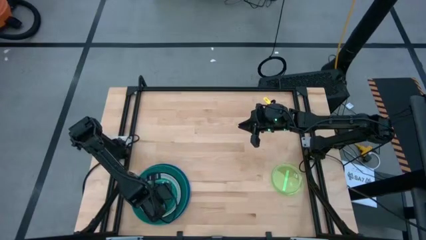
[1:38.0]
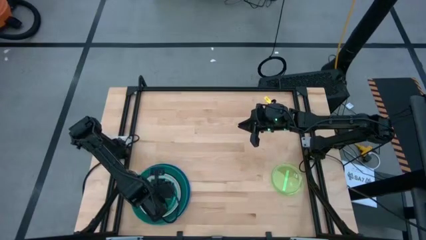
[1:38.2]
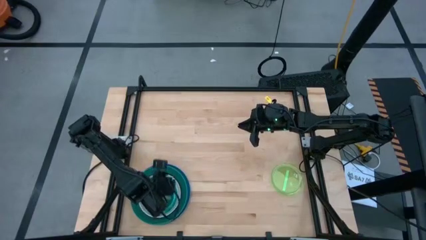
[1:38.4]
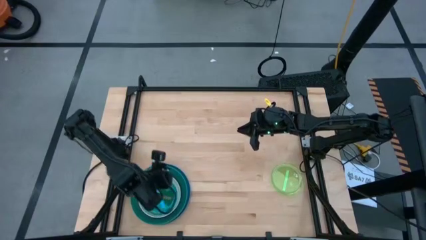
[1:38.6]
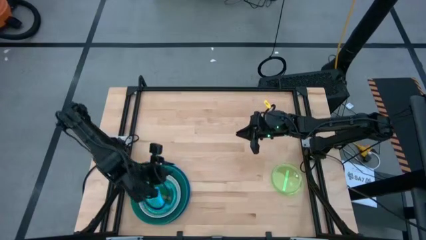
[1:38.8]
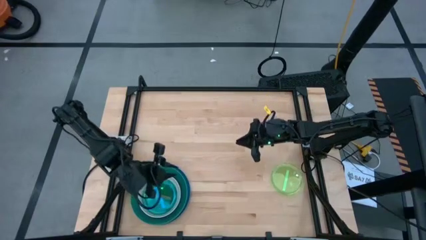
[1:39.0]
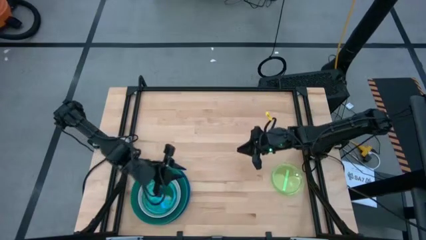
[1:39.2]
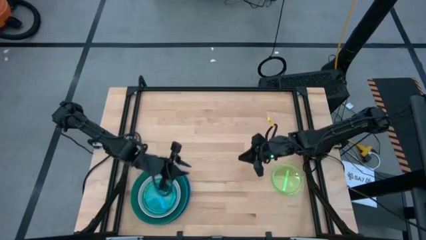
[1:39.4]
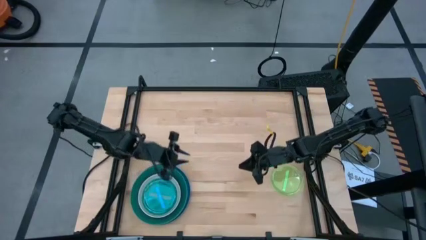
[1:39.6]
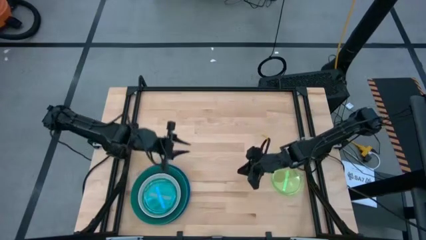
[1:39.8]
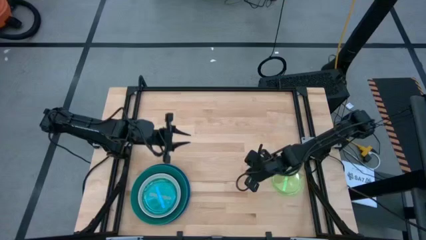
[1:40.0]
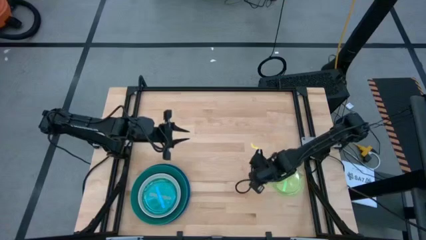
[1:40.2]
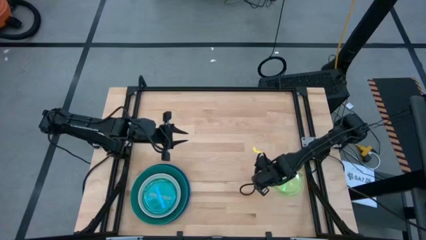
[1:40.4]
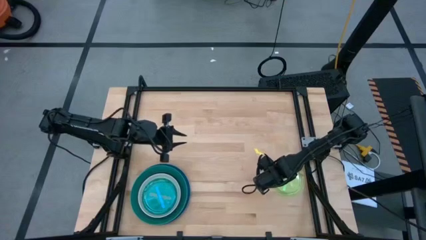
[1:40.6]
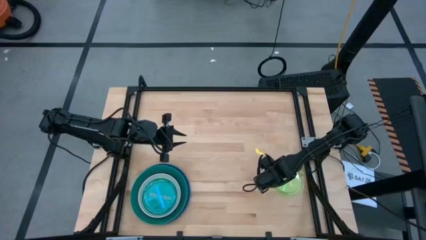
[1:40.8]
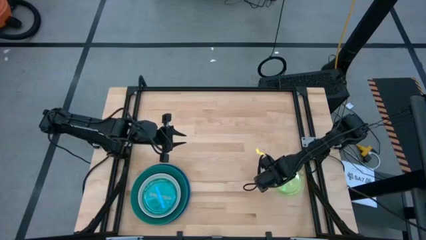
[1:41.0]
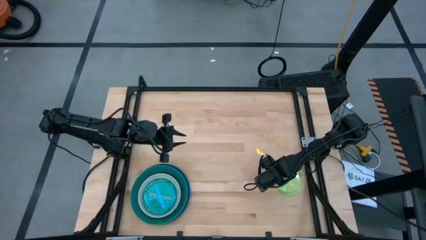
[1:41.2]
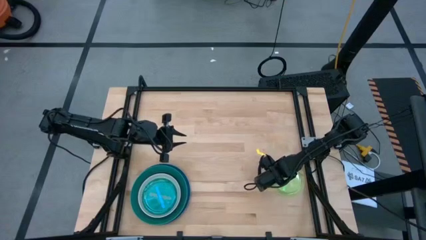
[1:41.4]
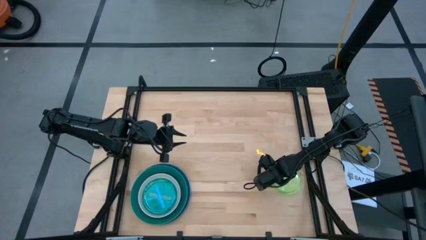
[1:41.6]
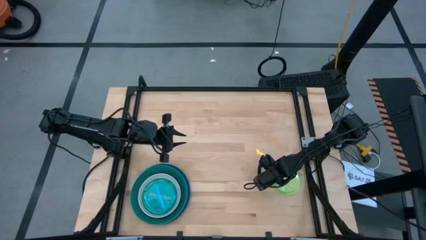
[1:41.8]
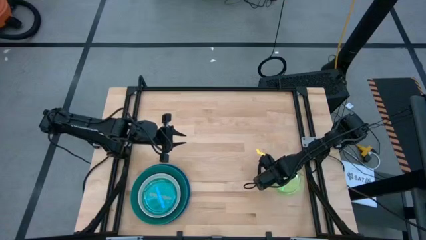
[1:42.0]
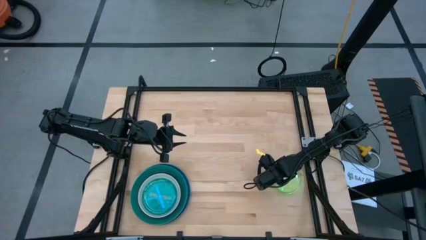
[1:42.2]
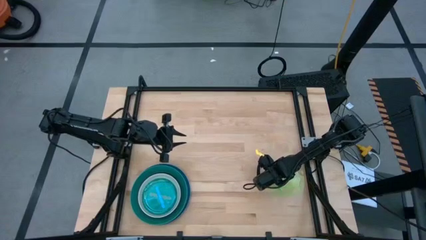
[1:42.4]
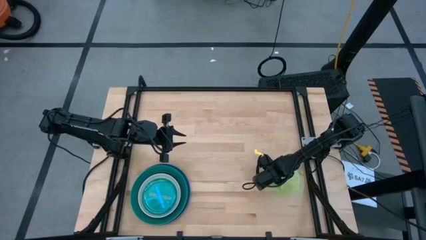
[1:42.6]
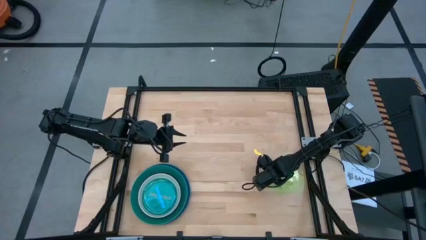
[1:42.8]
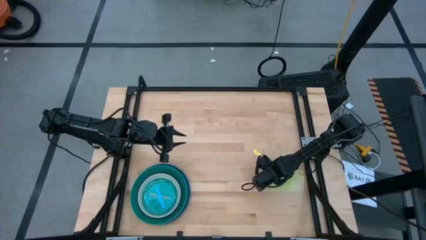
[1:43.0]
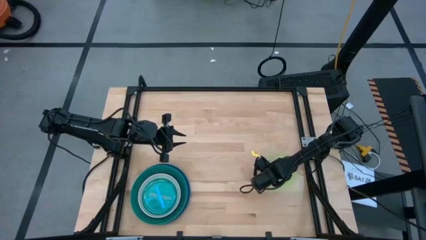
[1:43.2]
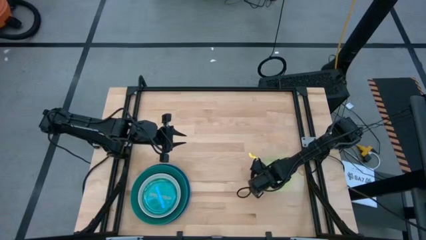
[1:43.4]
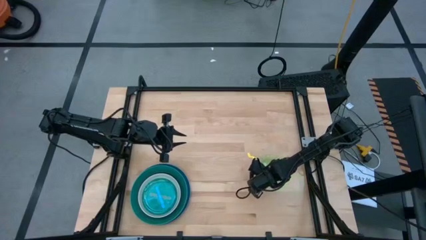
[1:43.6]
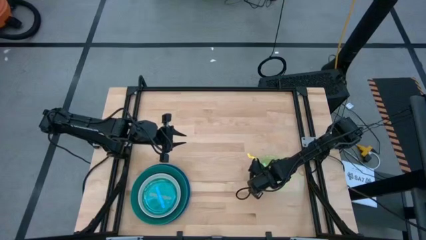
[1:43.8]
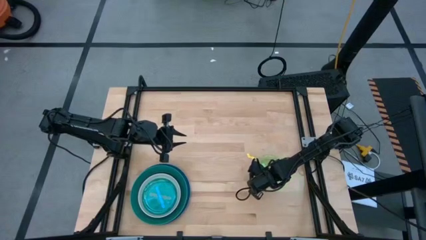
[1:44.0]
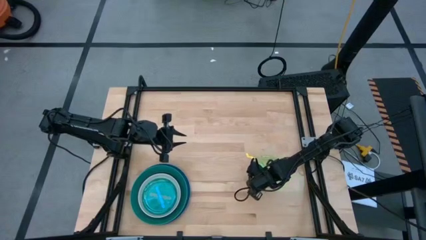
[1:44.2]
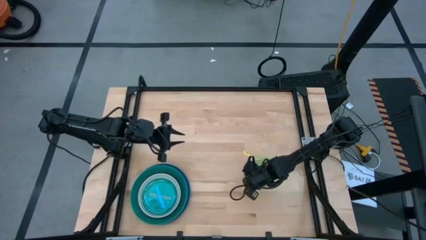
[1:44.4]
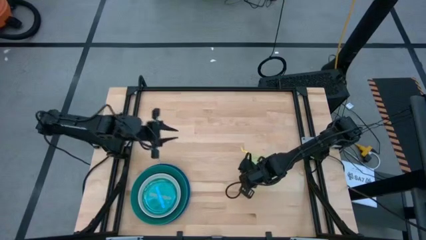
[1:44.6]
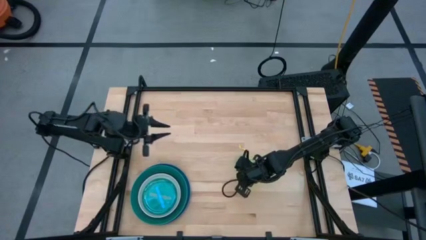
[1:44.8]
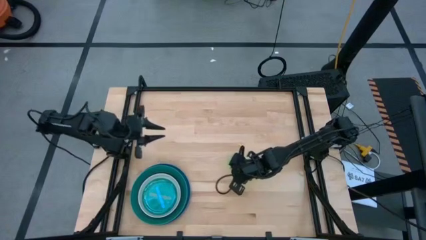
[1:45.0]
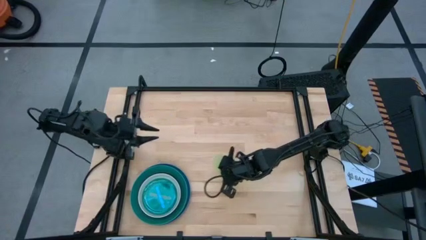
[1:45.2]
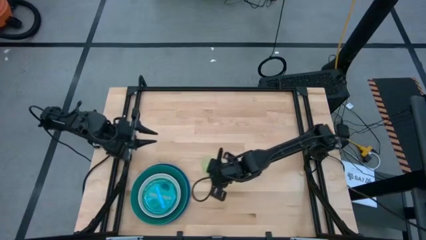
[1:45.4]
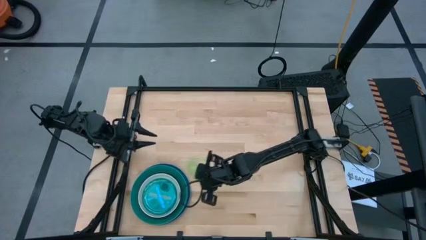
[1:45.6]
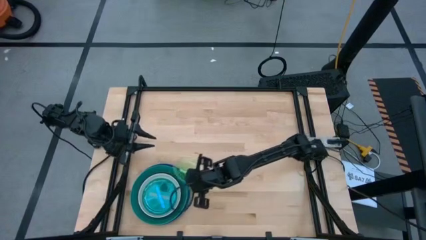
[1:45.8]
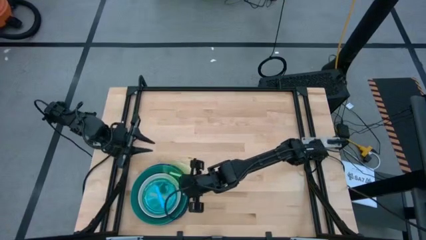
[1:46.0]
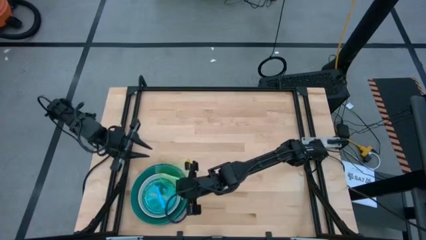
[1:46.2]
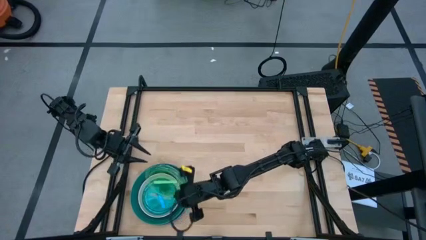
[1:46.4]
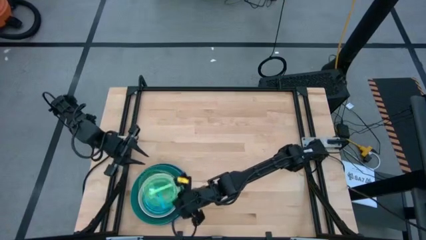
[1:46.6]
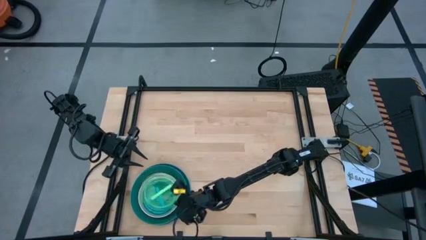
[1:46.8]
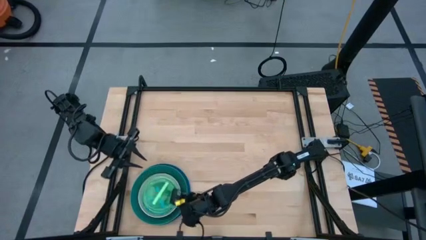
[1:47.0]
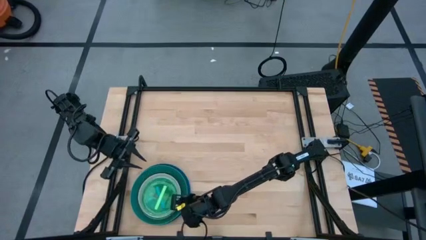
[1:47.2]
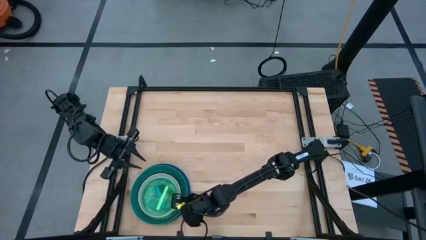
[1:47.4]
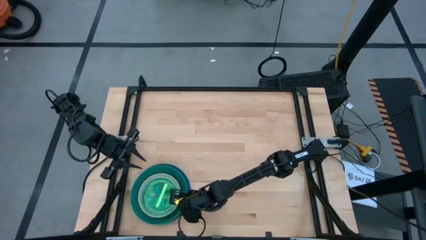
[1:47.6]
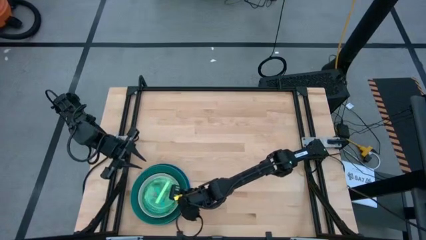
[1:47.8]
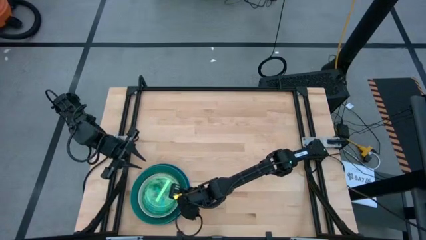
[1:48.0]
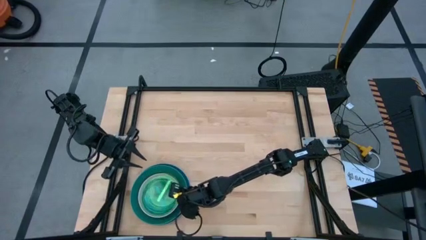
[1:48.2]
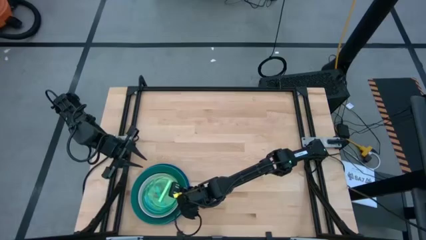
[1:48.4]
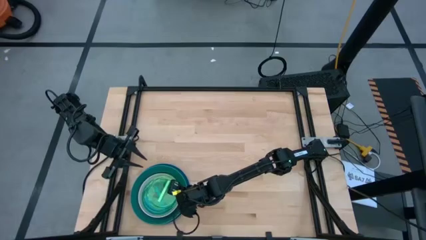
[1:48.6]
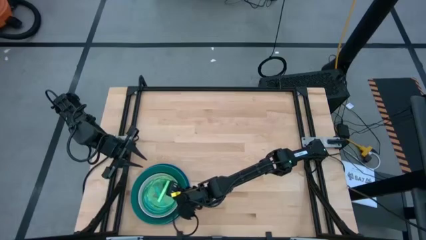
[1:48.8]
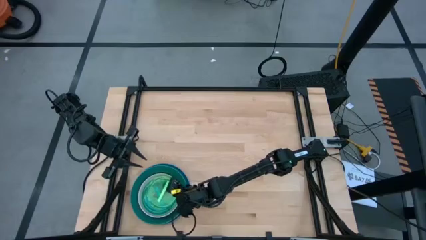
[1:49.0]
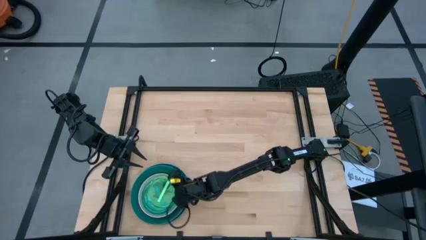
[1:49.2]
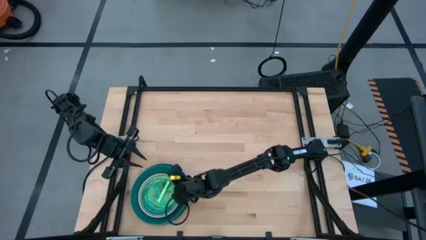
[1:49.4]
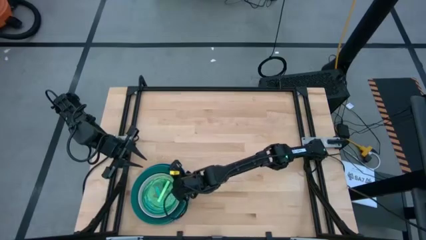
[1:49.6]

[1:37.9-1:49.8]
Task: Stack plastic plates
Stack the light green plate on top of the light blue plate

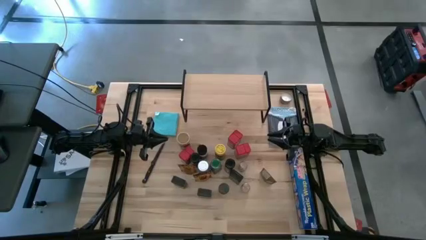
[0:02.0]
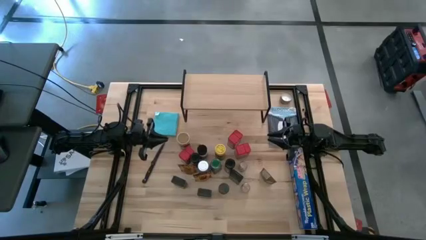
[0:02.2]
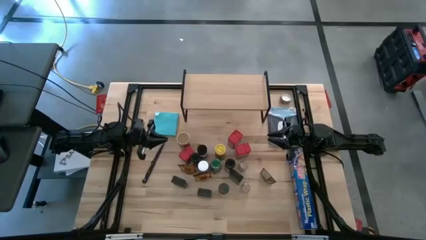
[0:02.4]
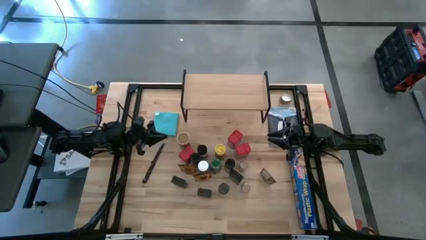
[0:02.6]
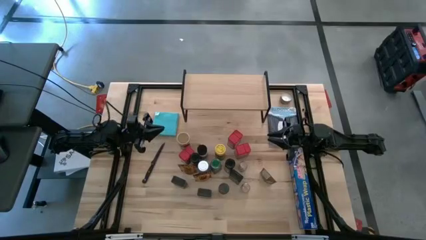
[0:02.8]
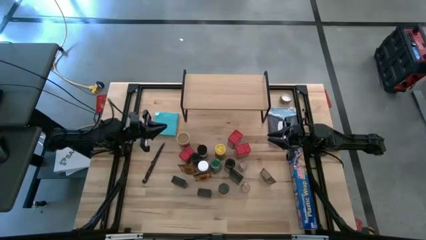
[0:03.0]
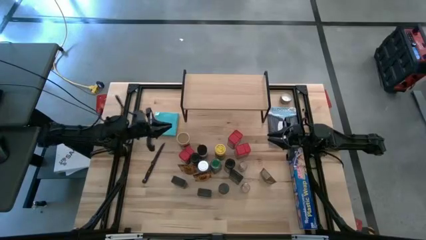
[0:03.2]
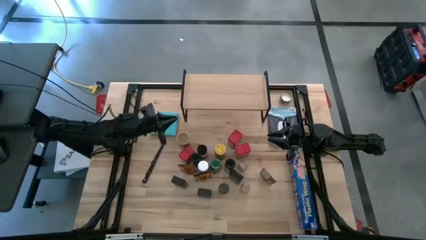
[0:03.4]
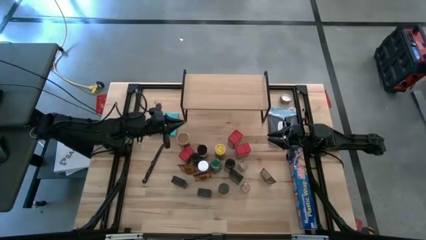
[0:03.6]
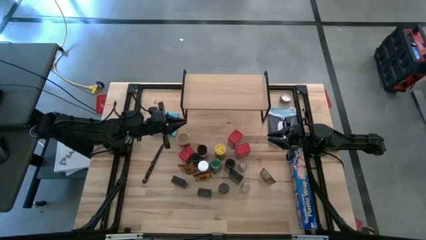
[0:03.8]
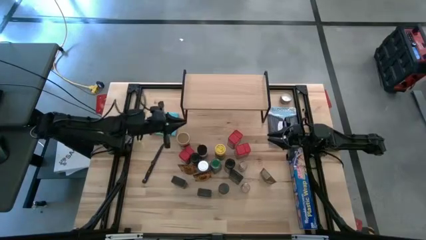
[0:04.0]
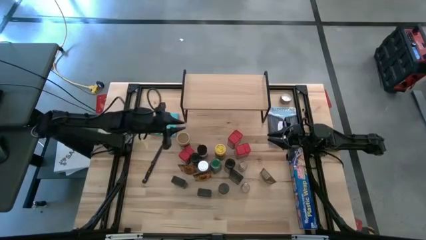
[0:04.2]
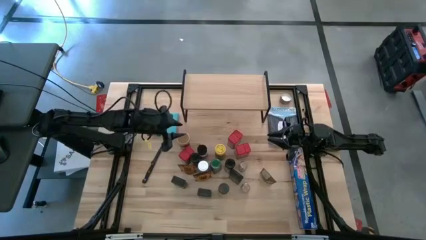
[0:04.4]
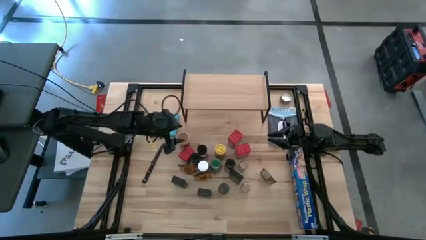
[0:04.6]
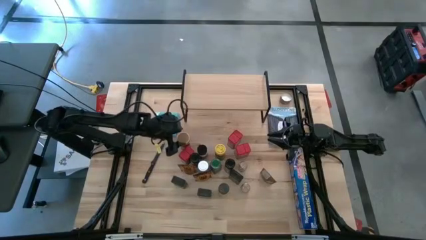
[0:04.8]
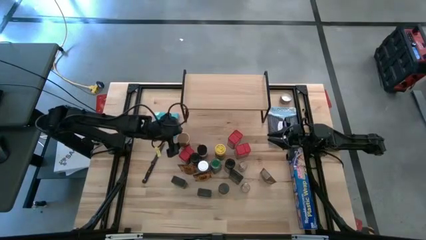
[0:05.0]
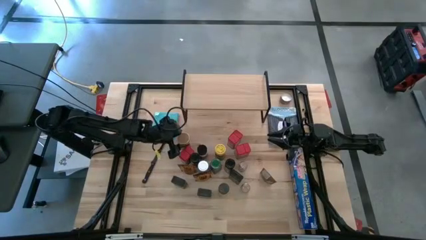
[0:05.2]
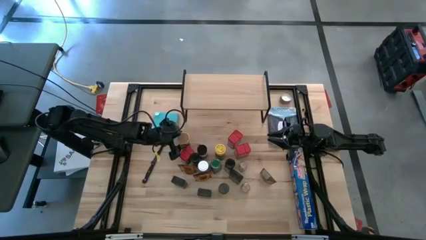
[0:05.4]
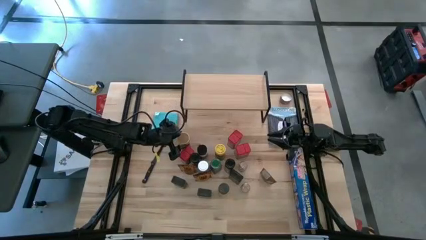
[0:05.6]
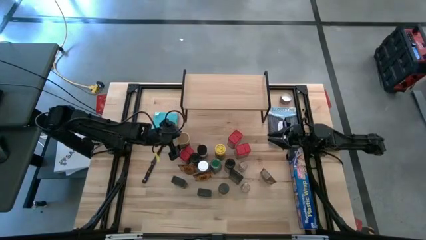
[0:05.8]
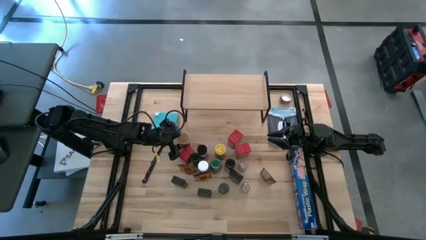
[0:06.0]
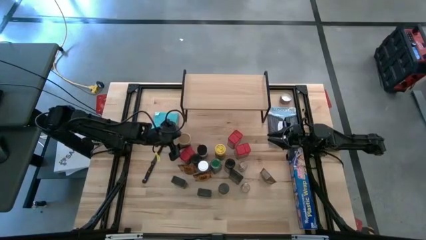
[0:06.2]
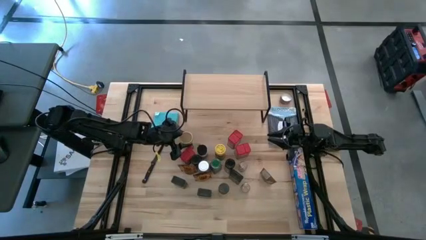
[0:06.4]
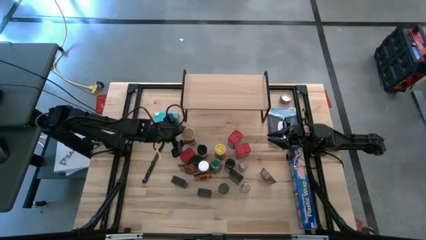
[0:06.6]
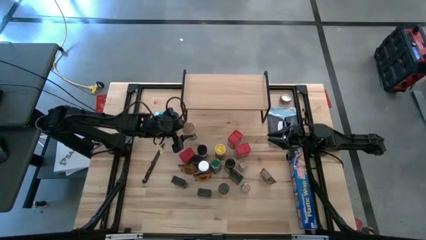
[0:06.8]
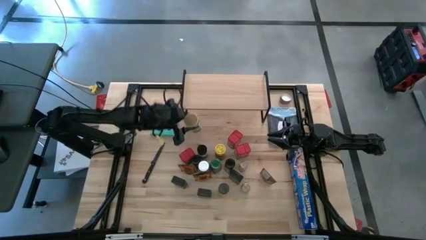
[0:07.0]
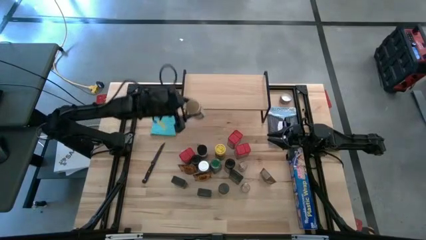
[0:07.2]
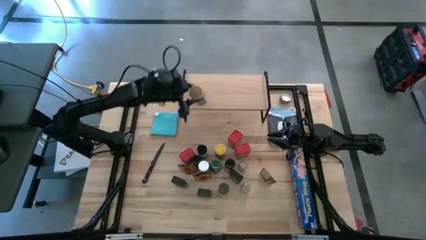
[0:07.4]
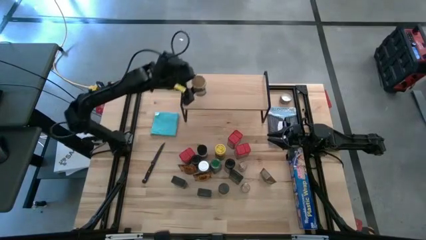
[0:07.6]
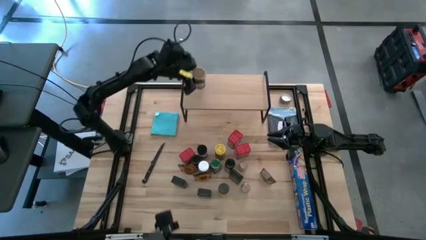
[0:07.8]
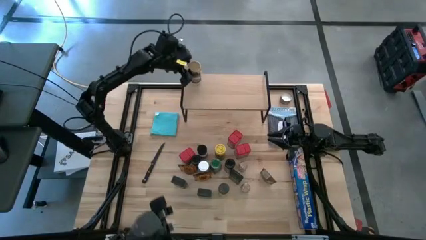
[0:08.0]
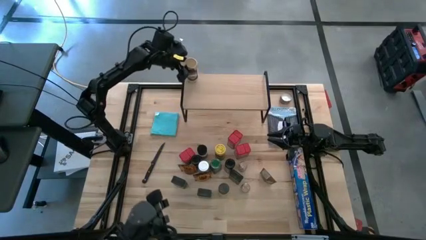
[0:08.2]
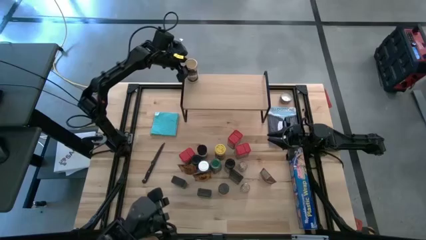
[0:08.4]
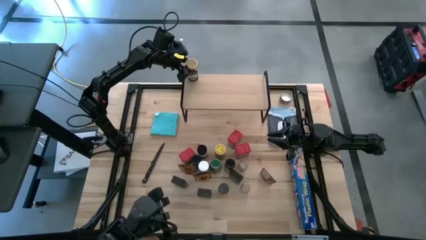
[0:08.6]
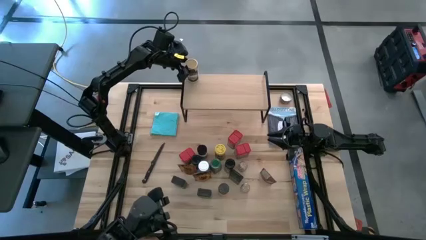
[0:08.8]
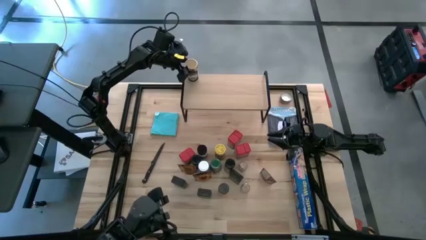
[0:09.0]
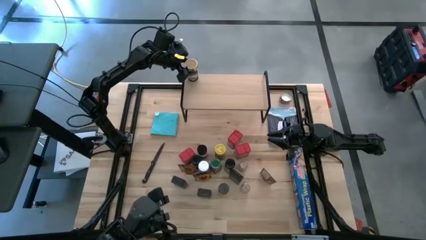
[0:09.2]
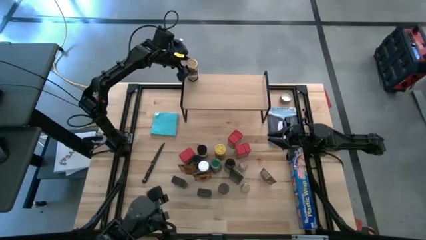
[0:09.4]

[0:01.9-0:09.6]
Task: Shelf spices
Put the gold seasoning bottle on the shelf
